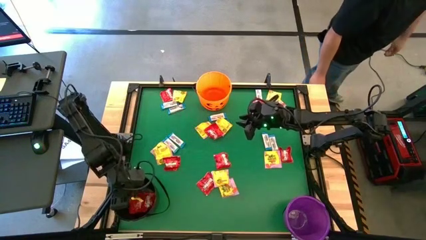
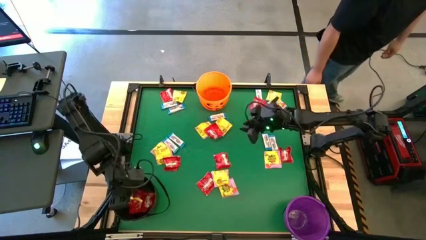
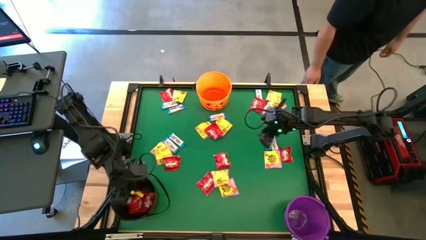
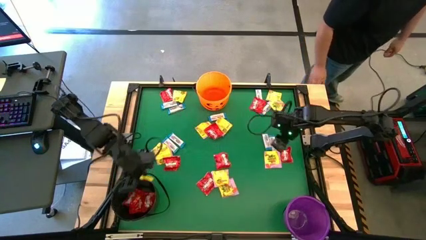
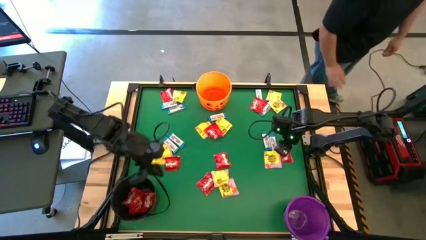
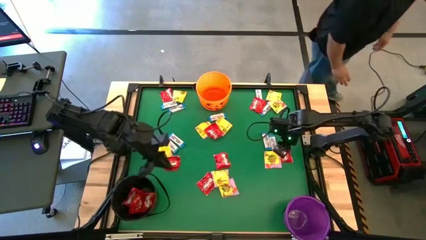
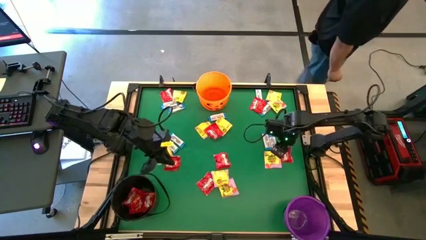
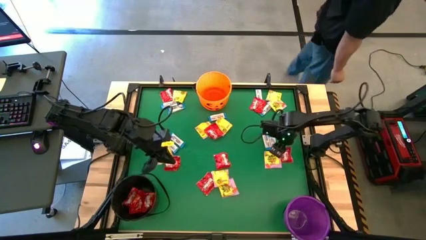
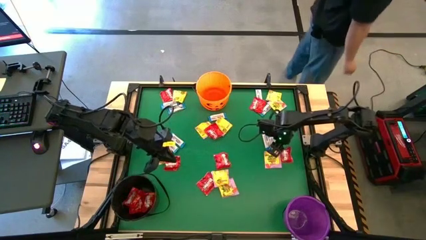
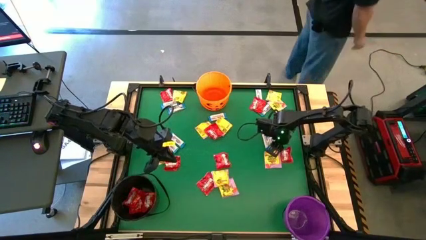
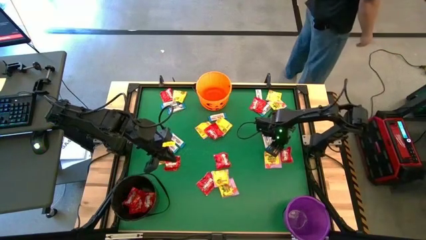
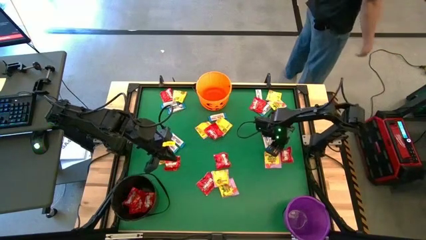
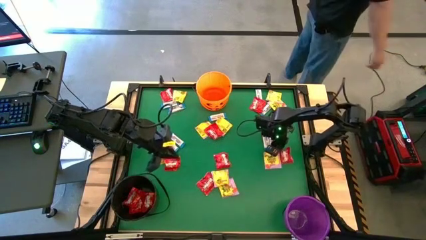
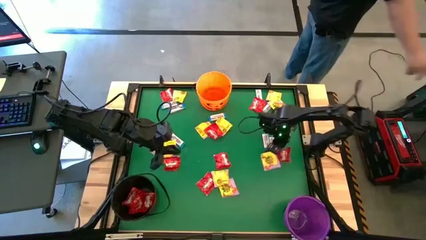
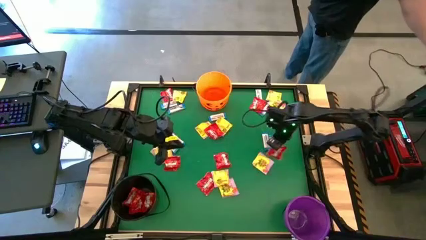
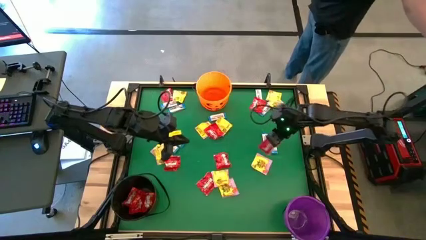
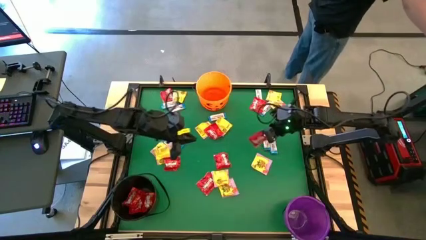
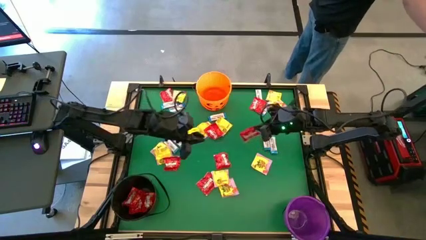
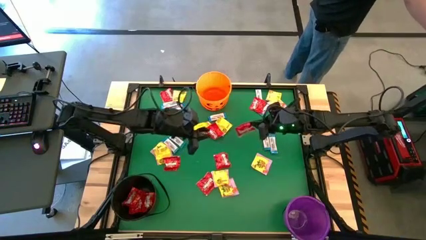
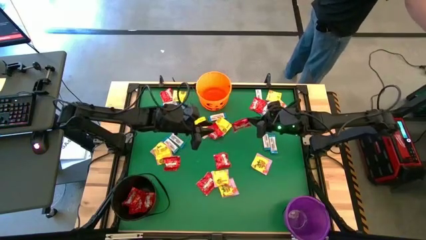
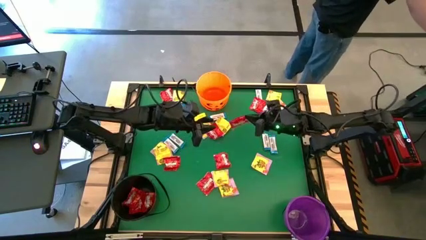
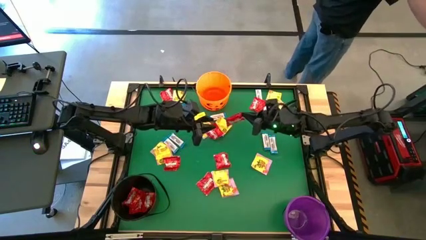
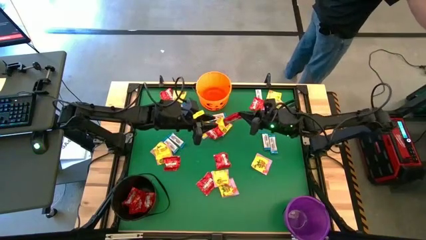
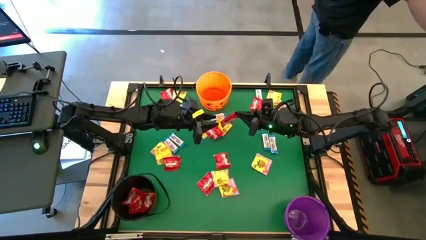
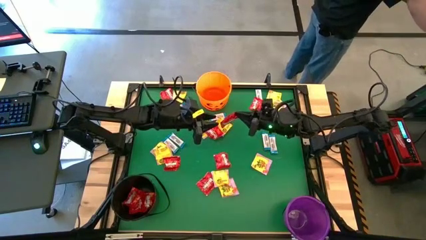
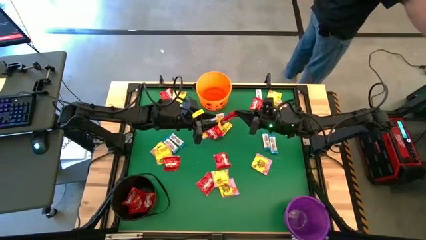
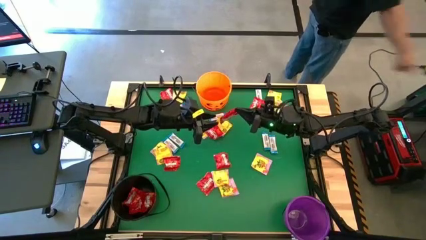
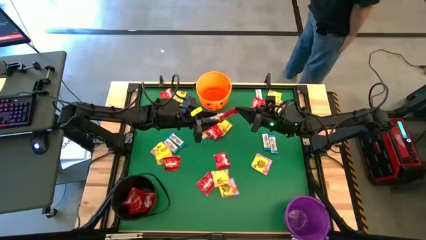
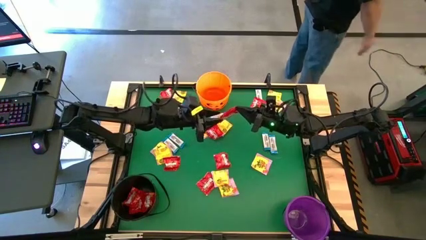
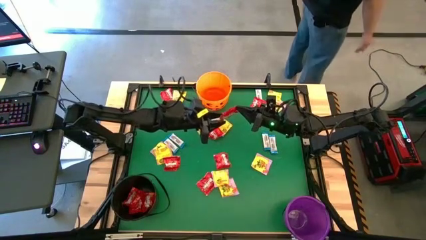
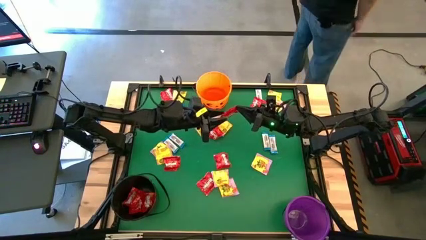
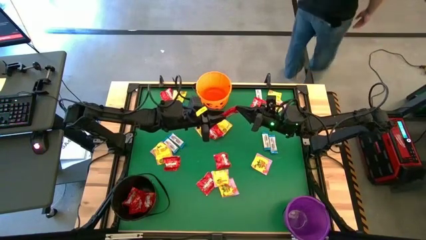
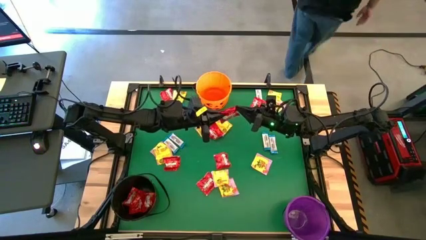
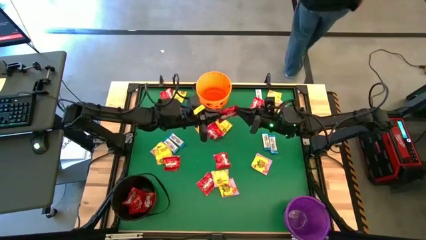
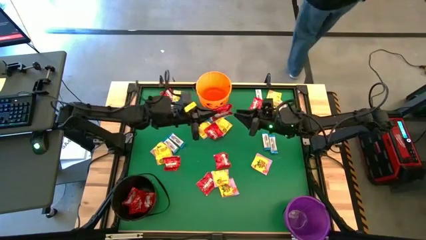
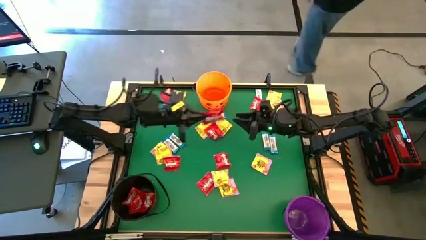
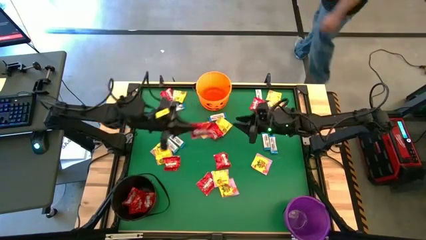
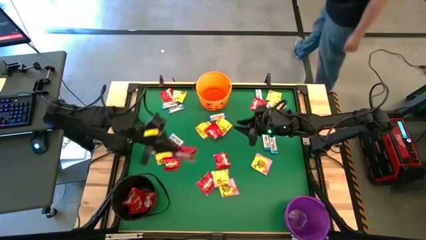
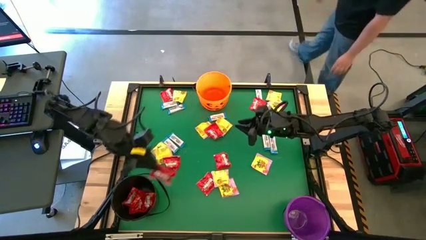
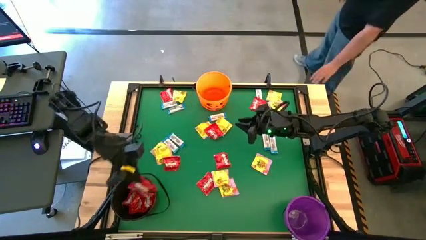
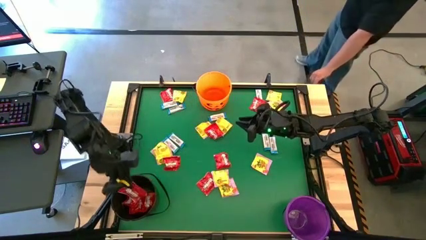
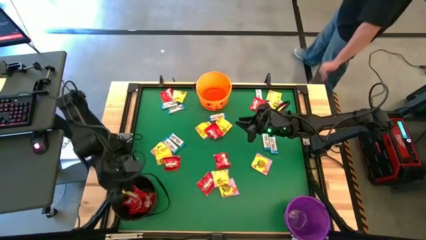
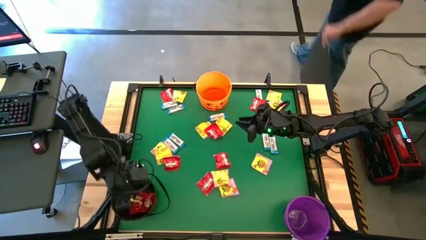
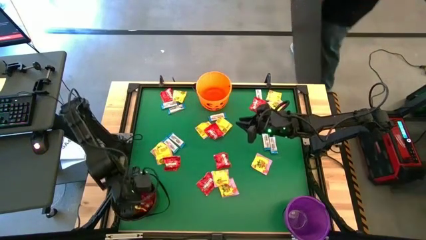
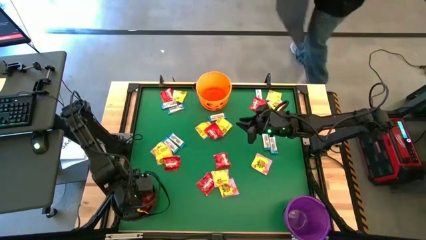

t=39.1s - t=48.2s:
Task: Sort candy by brand, put in halloween buckets
Put the red candy into the black bucket

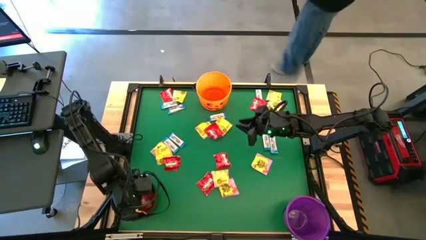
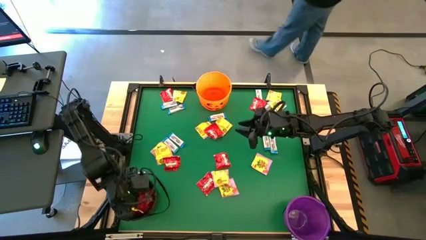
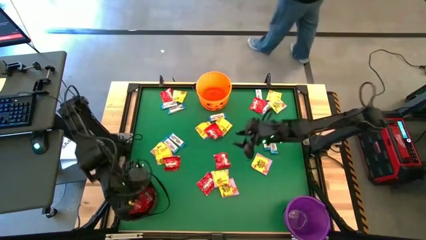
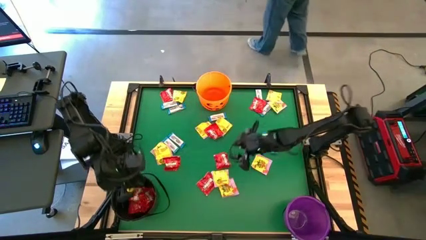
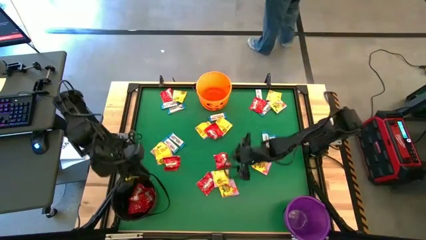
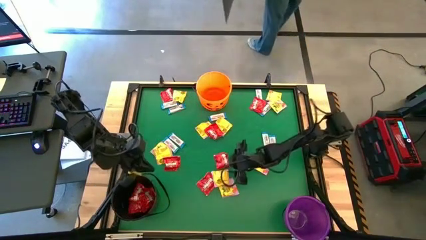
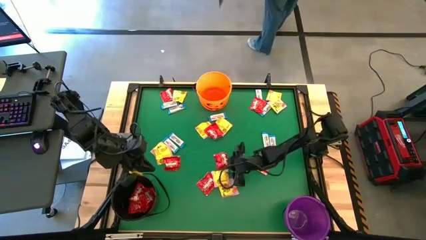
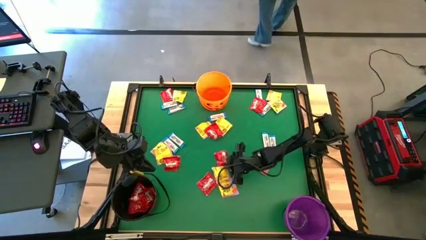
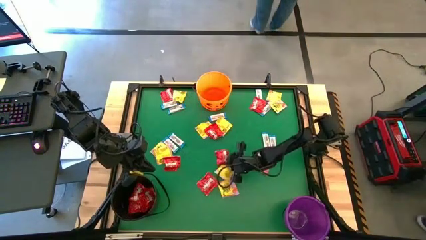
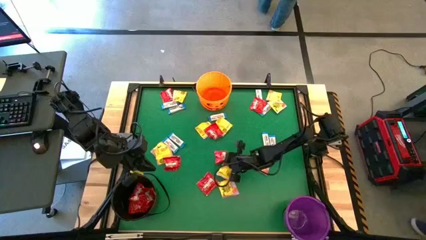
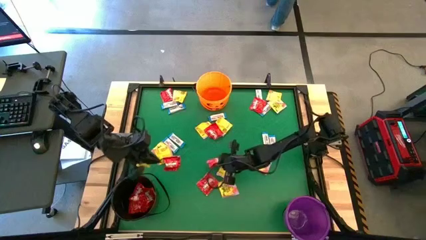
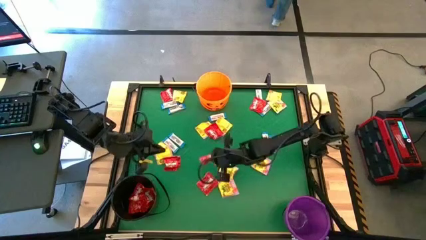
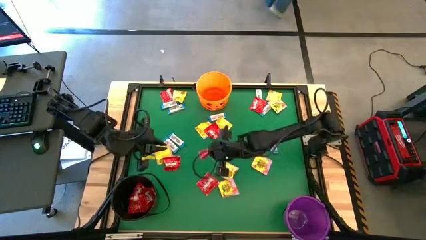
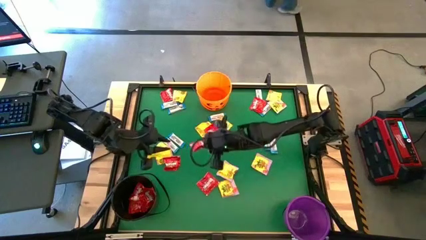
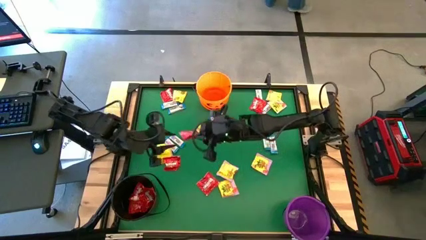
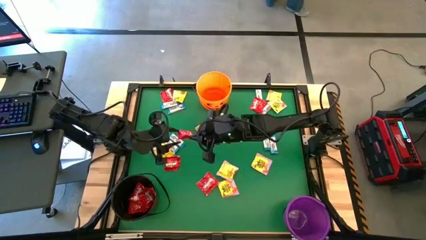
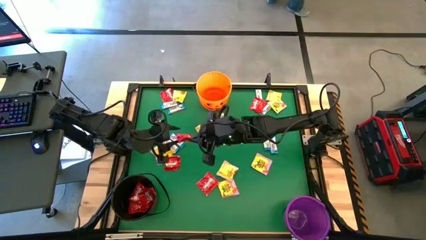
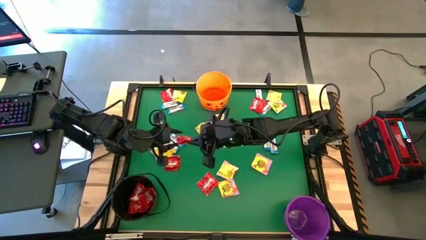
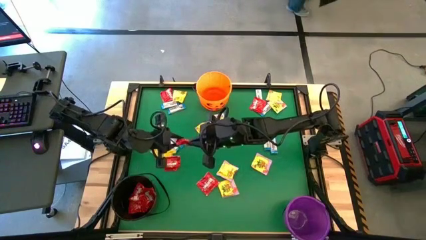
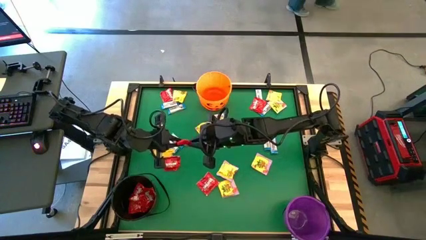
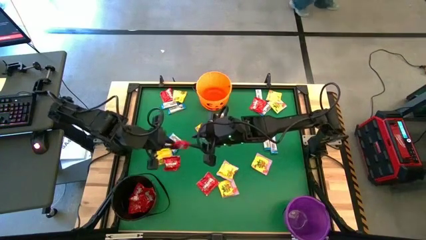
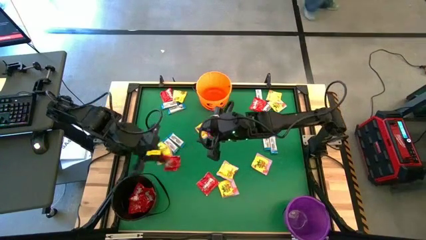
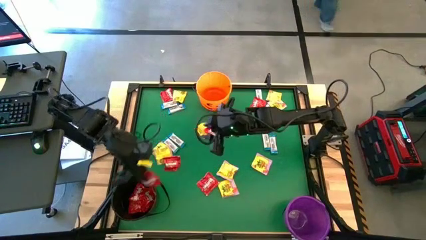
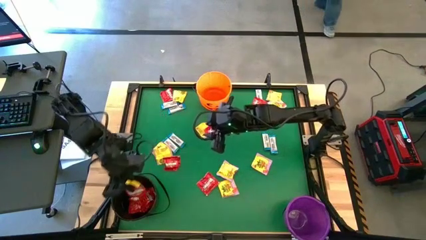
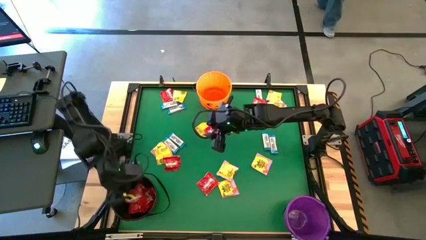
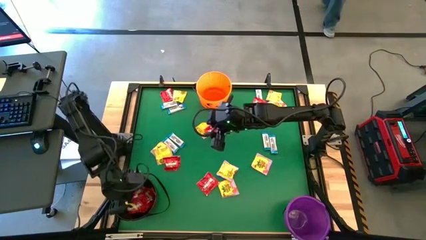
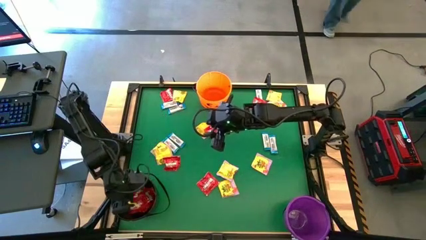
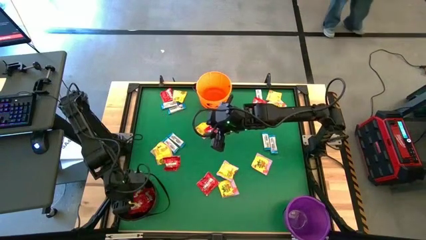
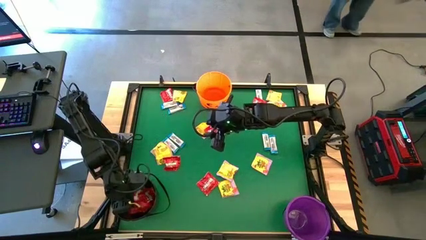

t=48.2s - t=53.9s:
Put the red candy into the black bucket
